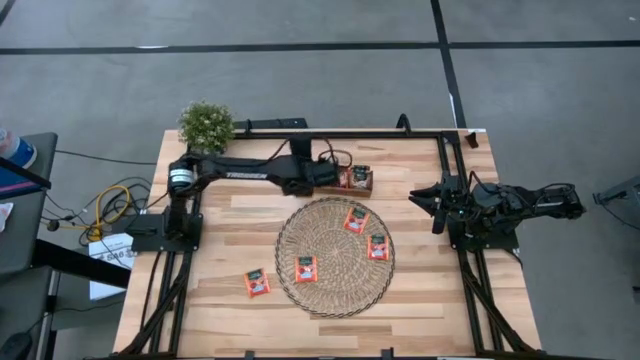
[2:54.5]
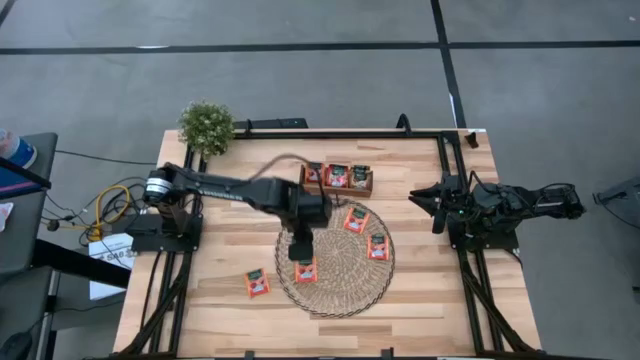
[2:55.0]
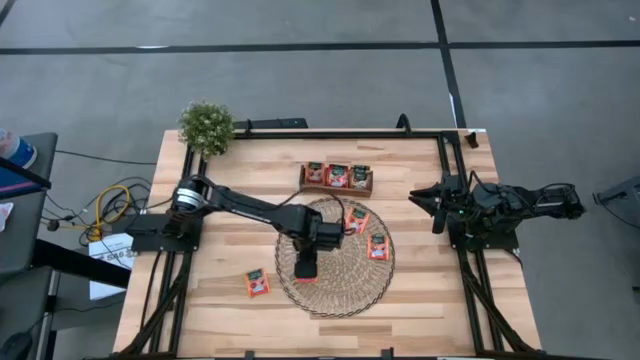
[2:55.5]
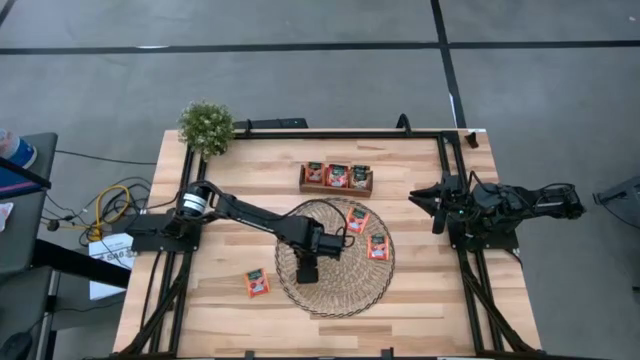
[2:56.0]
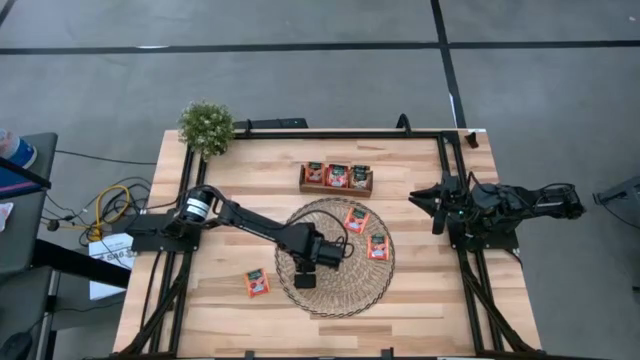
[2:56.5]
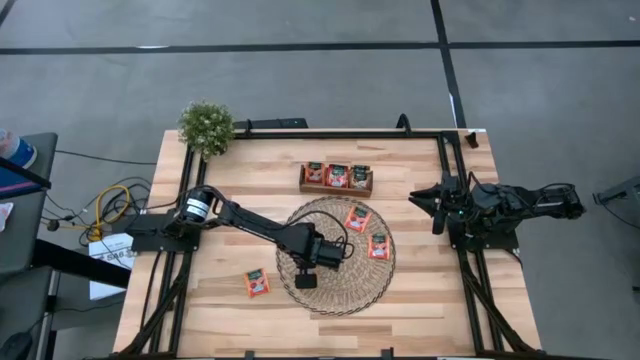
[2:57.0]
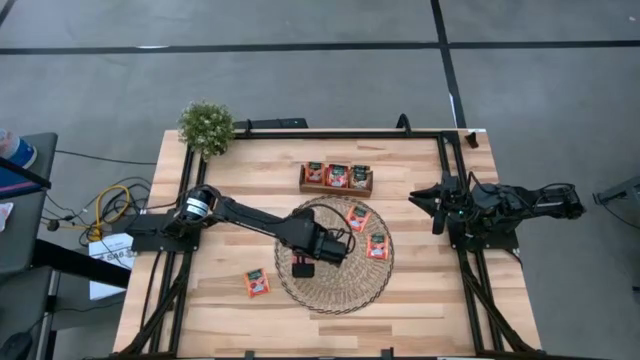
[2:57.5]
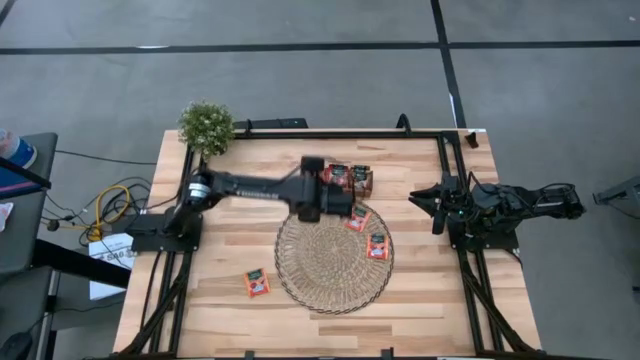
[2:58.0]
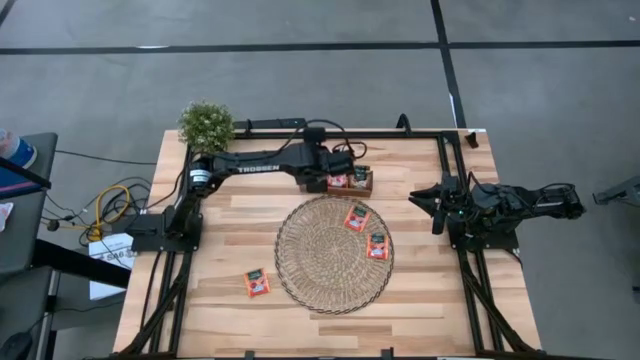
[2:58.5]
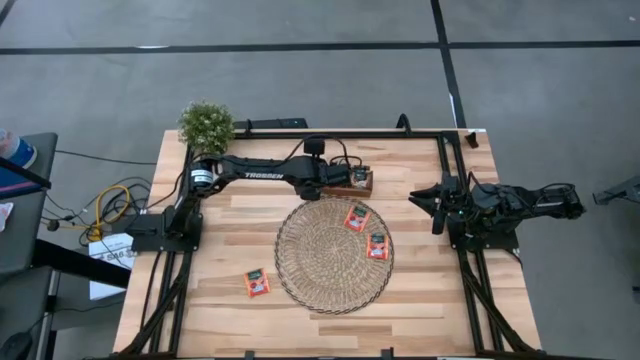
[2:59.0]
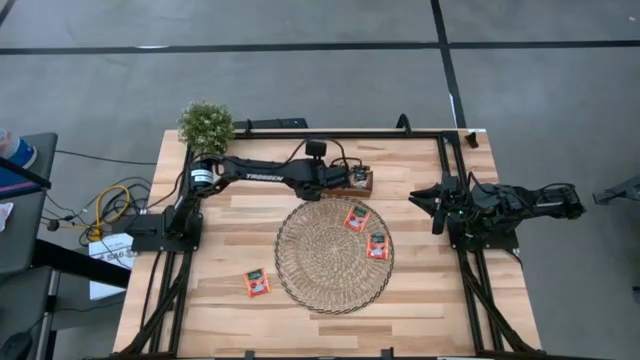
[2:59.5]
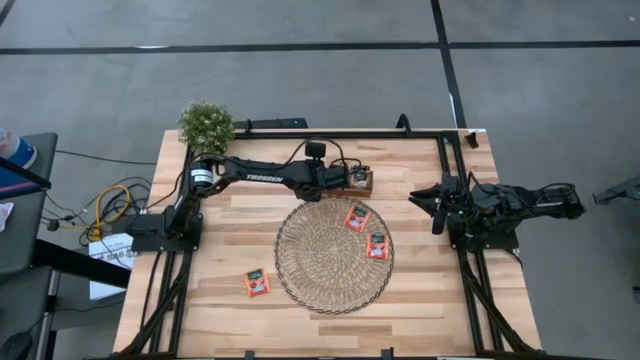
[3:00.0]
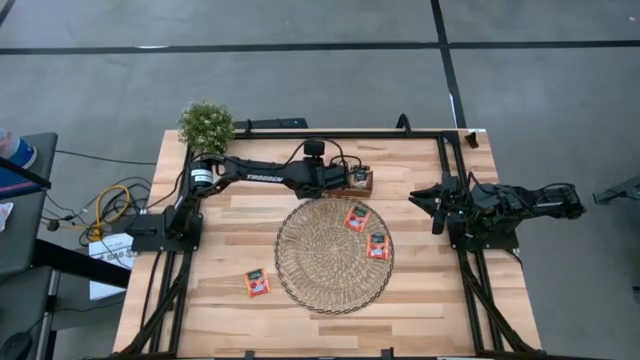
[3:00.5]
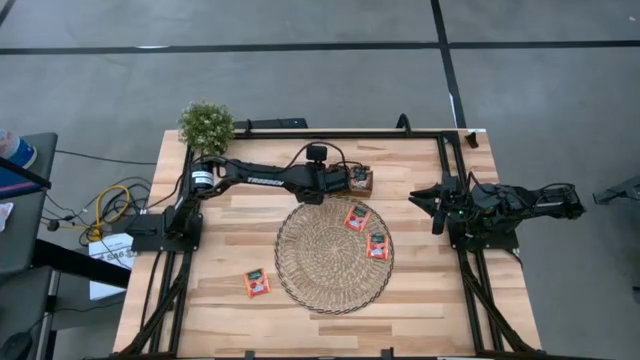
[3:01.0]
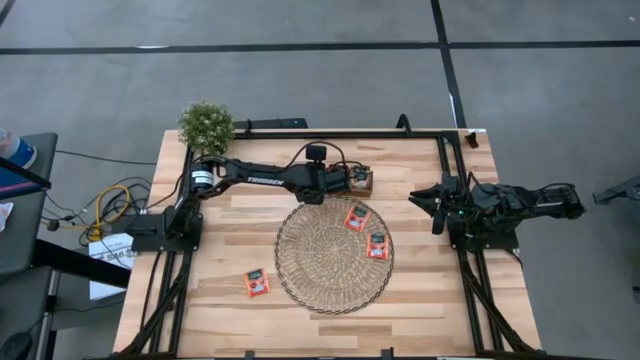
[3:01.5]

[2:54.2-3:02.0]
Task: Pick & Place Tea
Put the orange tea bag into the left section of the wooden organizer

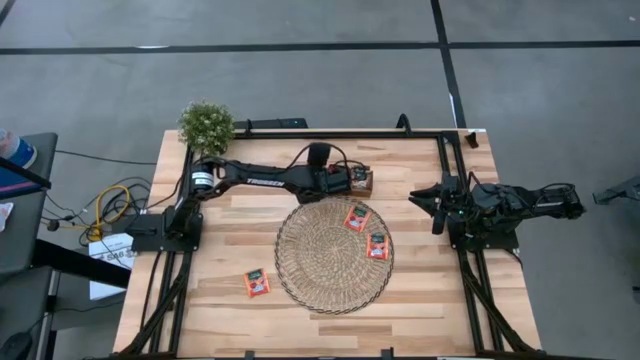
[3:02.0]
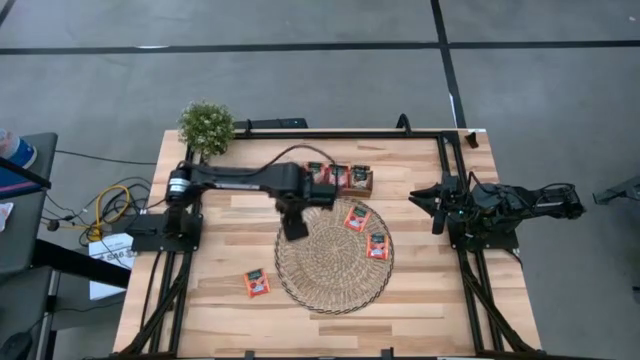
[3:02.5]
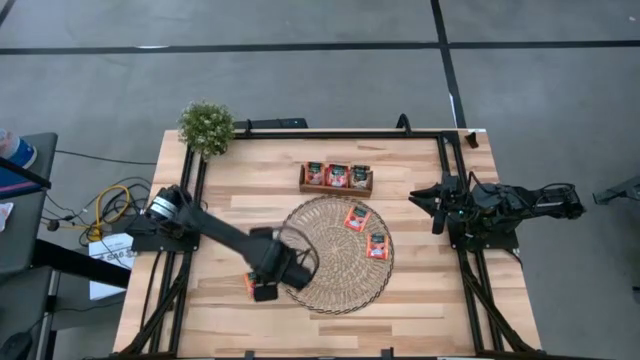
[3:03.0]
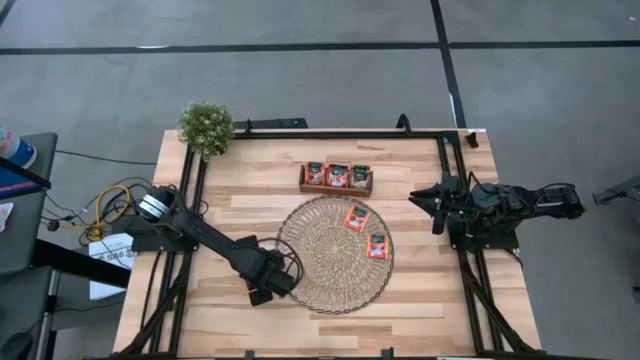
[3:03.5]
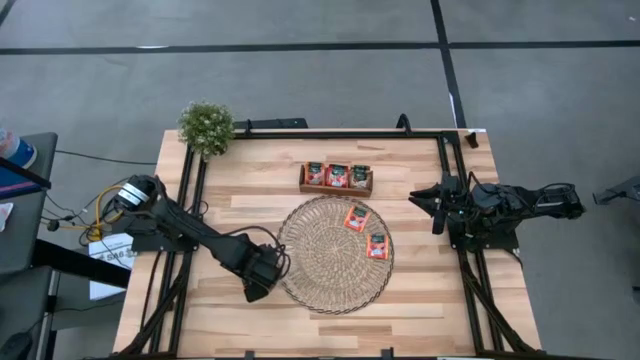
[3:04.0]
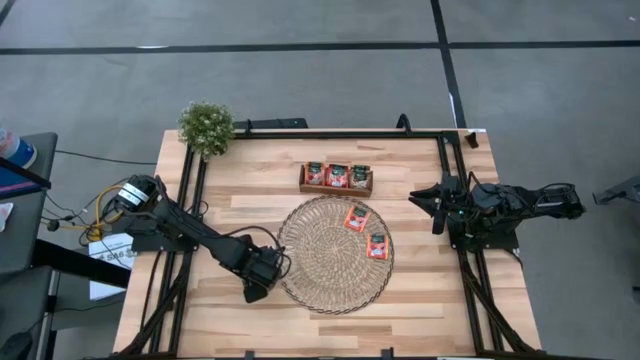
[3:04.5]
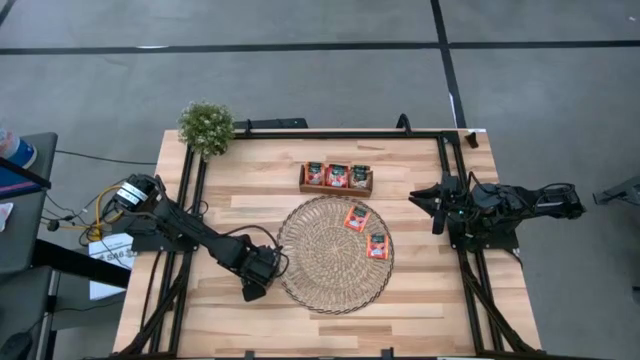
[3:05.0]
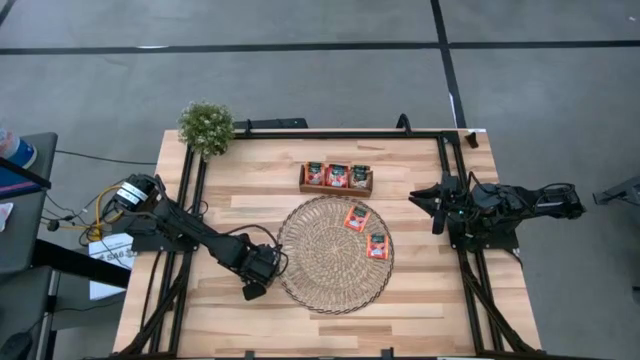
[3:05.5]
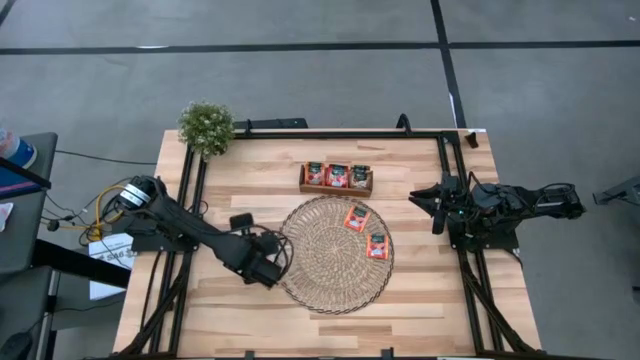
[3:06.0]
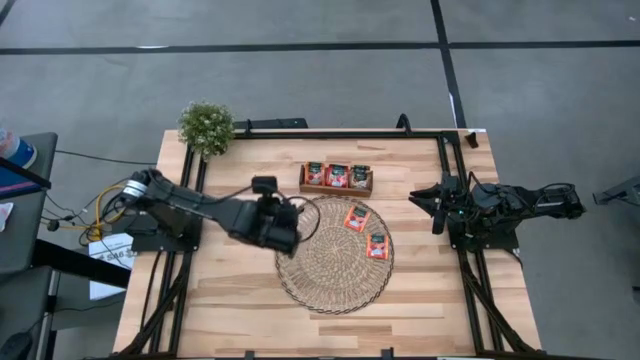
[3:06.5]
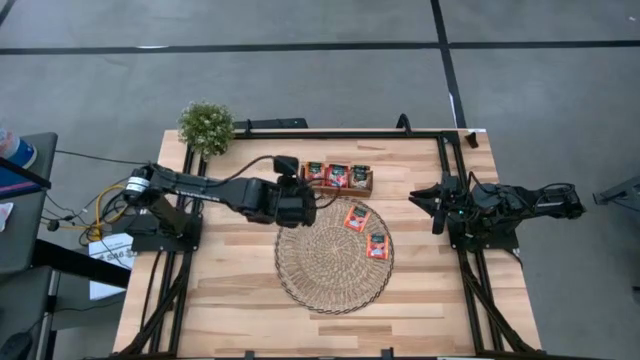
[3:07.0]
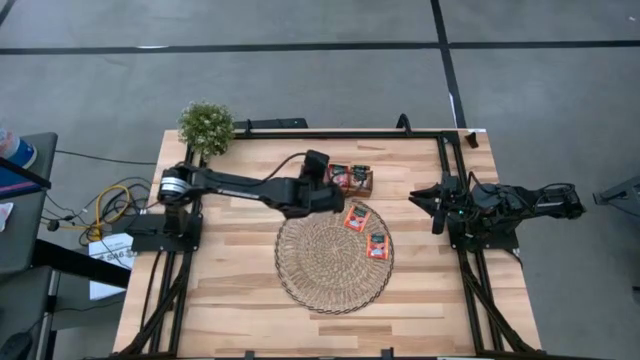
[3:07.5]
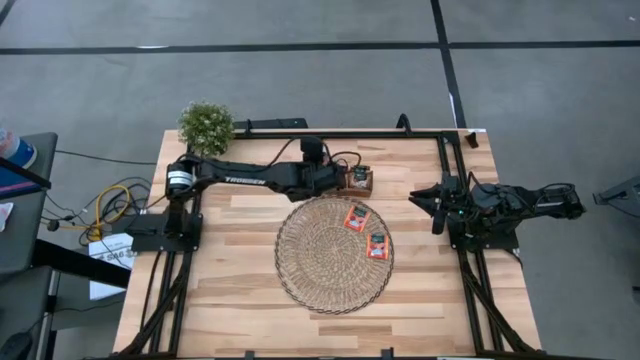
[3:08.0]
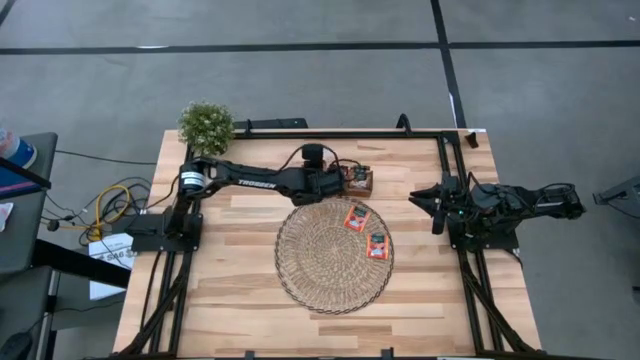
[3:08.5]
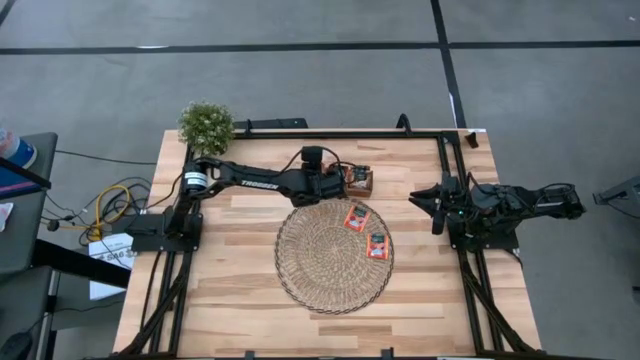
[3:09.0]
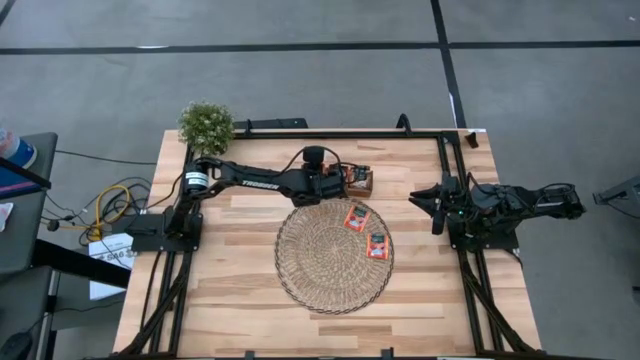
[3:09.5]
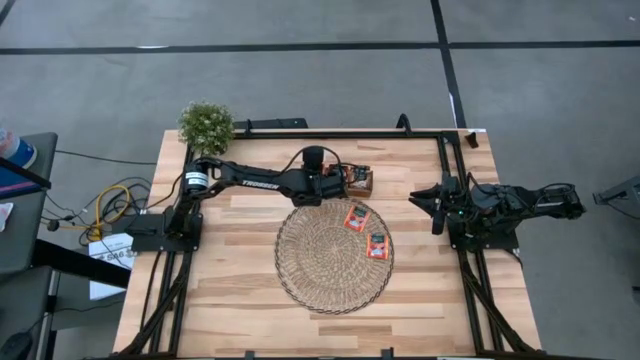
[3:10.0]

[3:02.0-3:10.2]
Put the orange tea bag into the left section of the wooden organizer

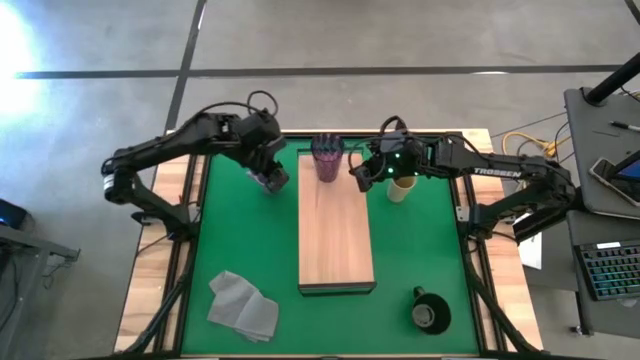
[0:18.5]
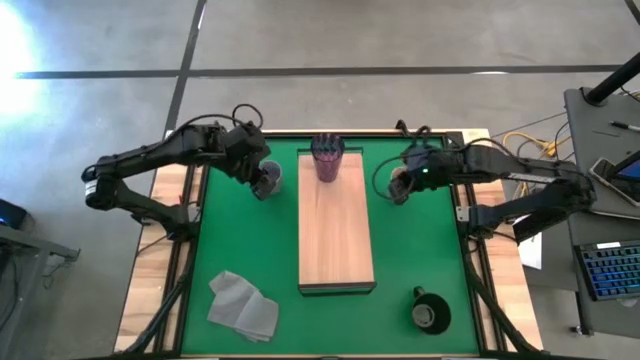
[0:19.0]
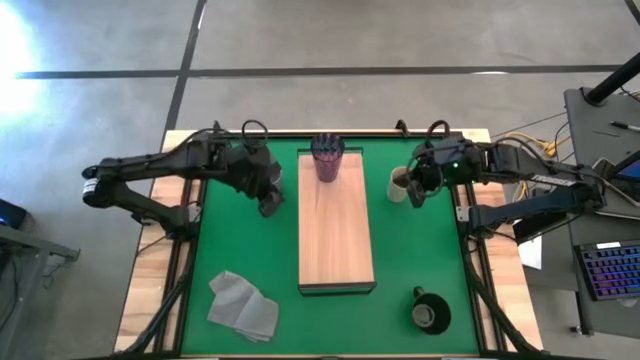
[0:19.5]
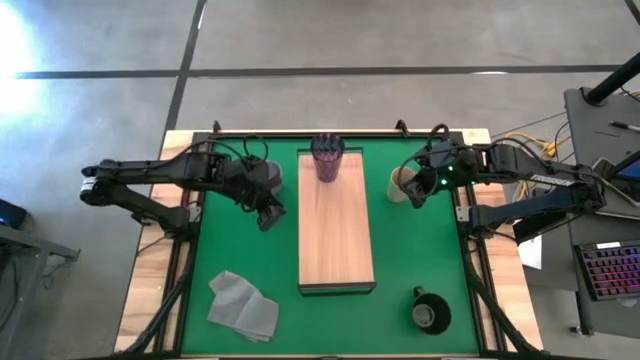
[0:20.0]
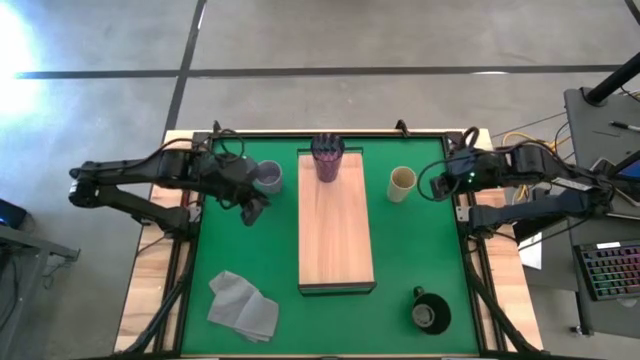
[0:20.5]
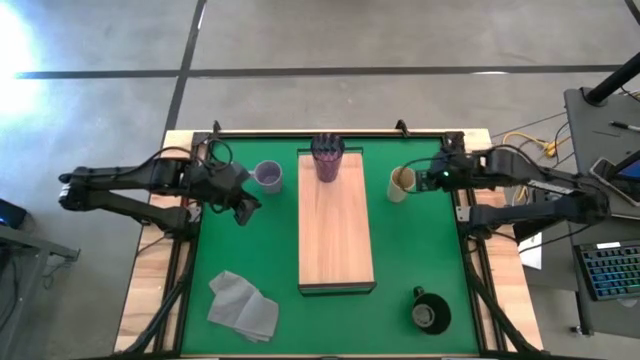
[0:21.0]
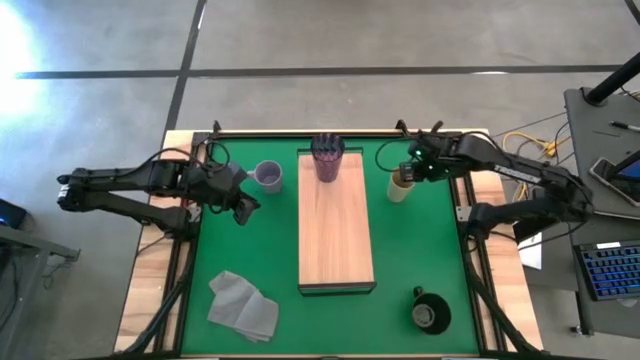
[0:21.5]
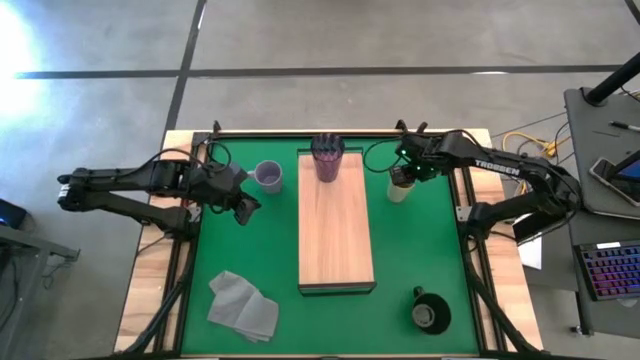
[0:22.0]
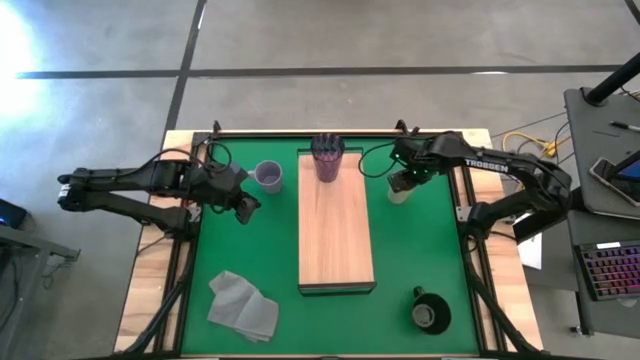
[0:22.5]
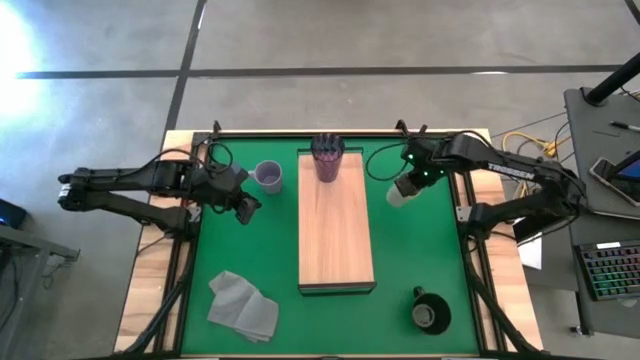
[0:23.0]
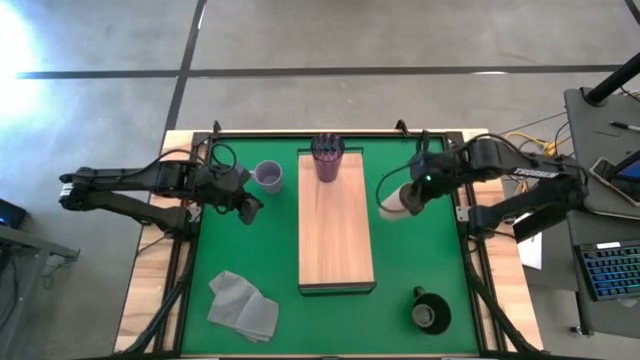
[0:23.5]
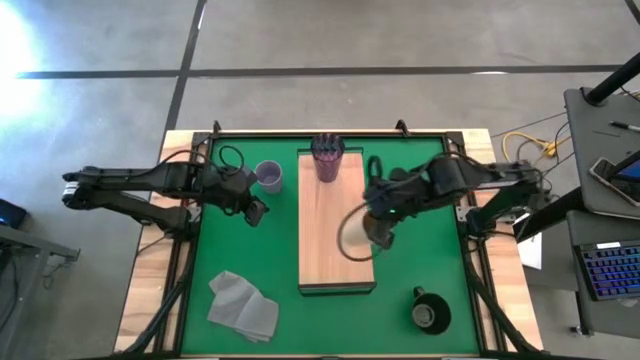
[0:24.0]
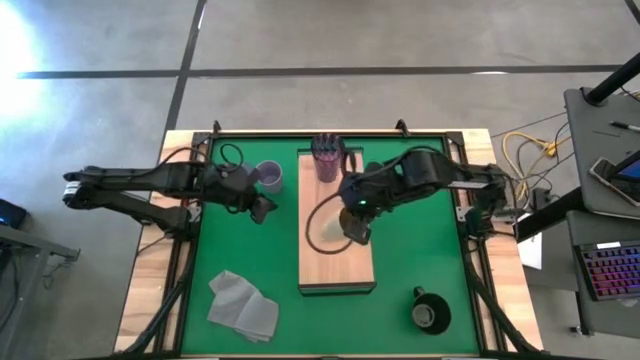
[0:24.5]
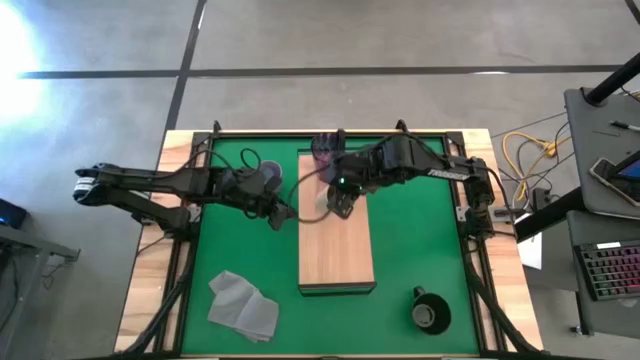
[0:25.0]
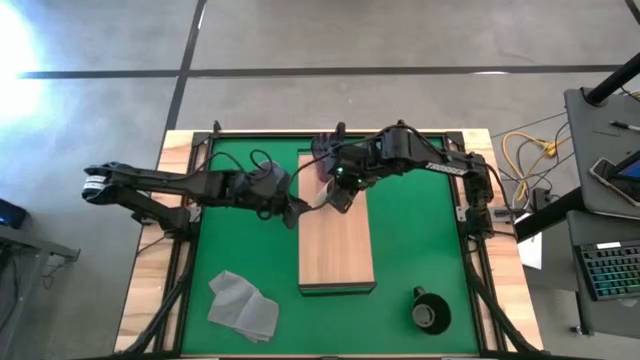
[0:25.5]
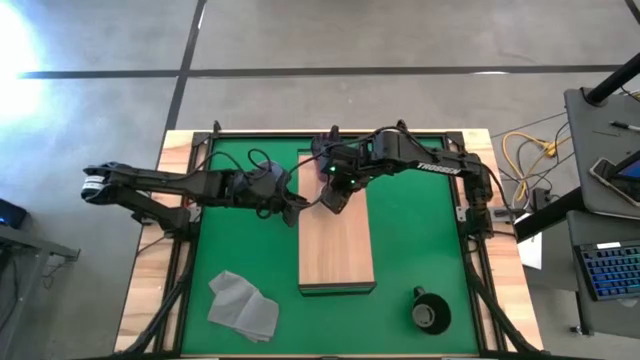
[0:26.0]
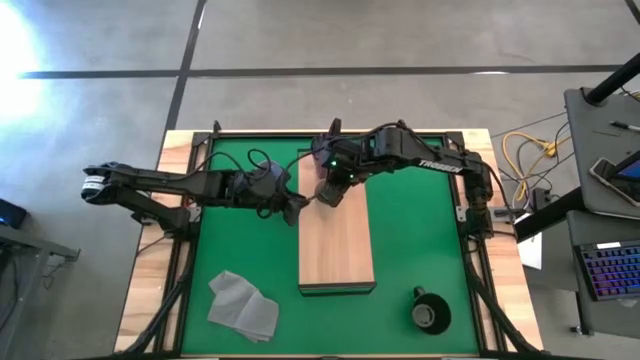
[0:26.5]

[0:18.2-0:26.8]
Task: Stack small to large cups/mugs on shelf
Put the white cup on the shelf
